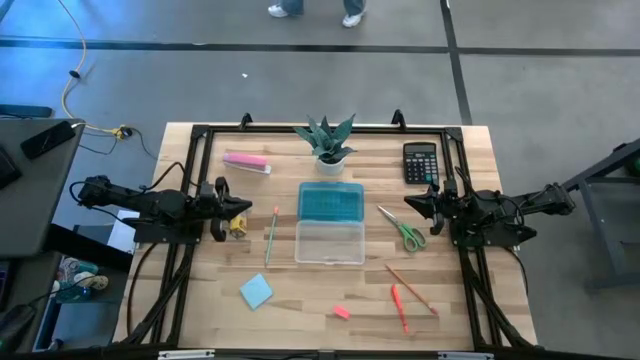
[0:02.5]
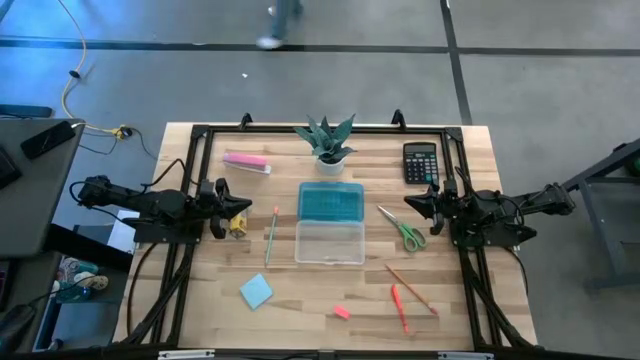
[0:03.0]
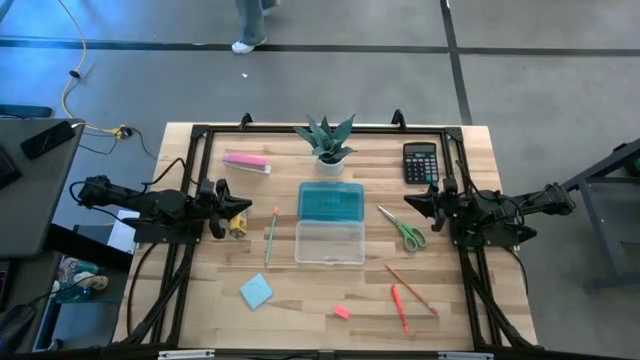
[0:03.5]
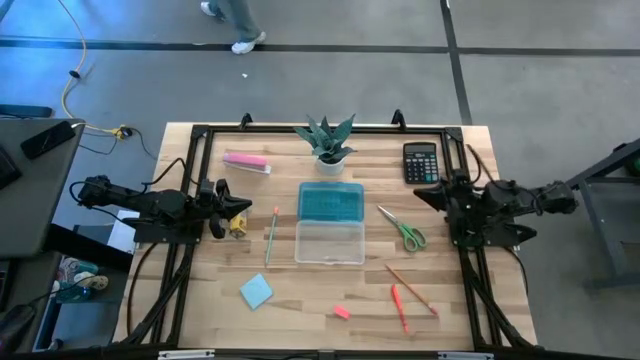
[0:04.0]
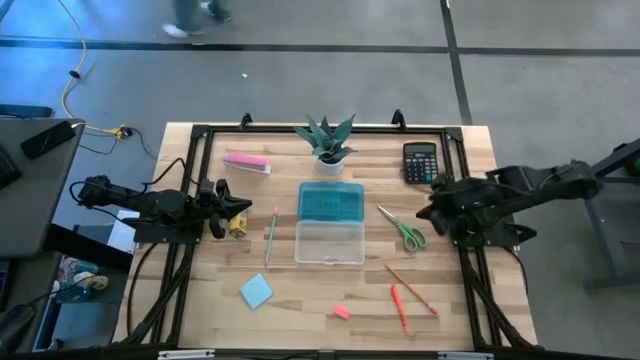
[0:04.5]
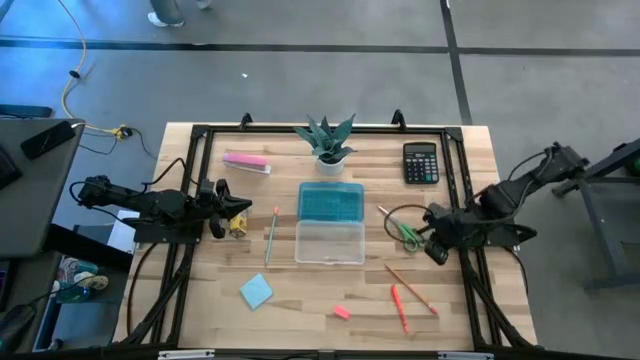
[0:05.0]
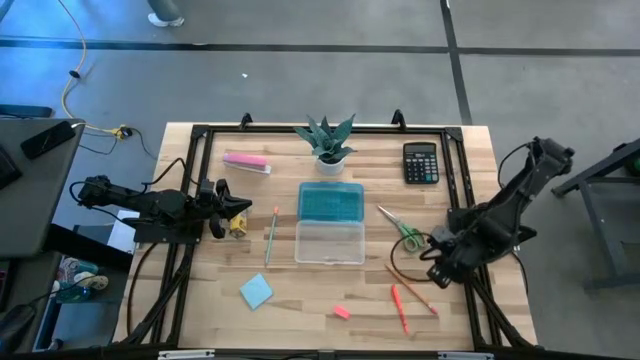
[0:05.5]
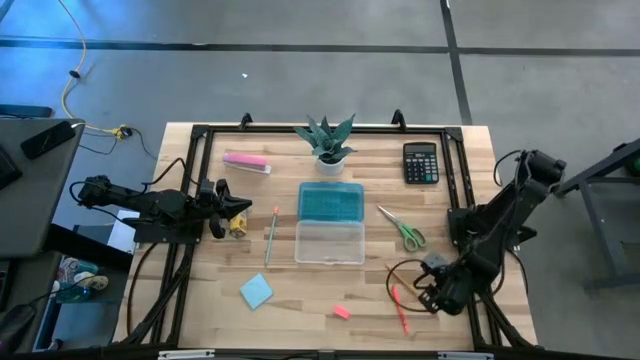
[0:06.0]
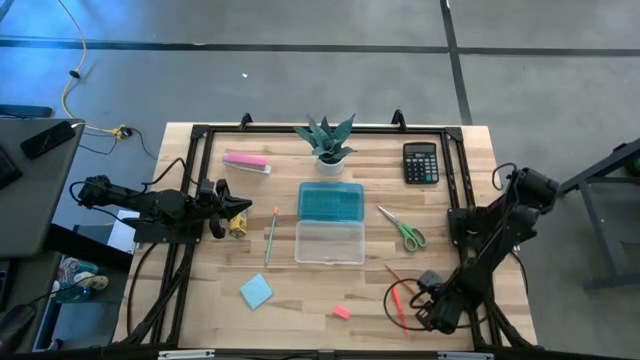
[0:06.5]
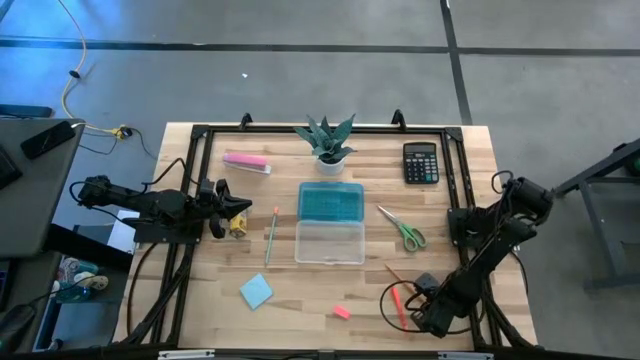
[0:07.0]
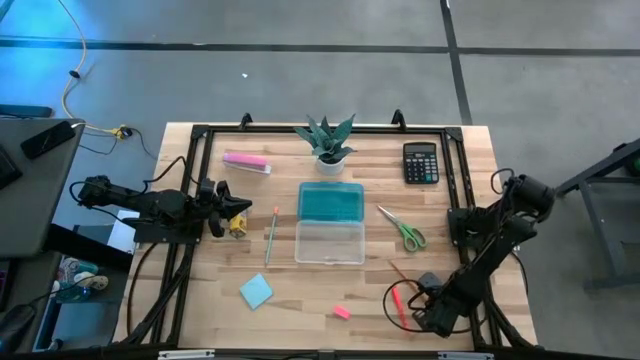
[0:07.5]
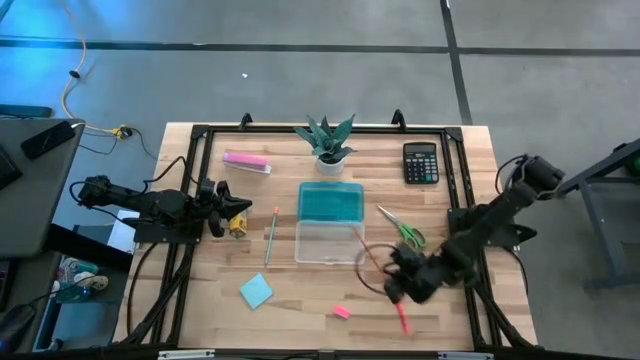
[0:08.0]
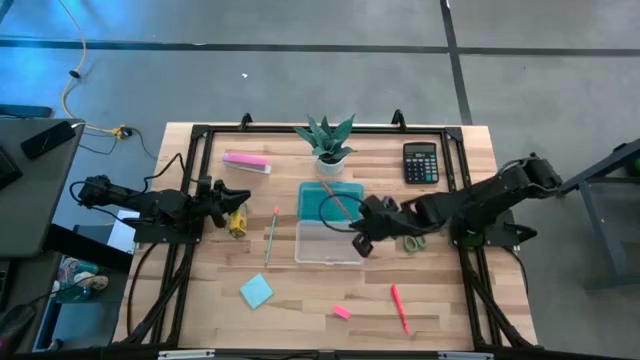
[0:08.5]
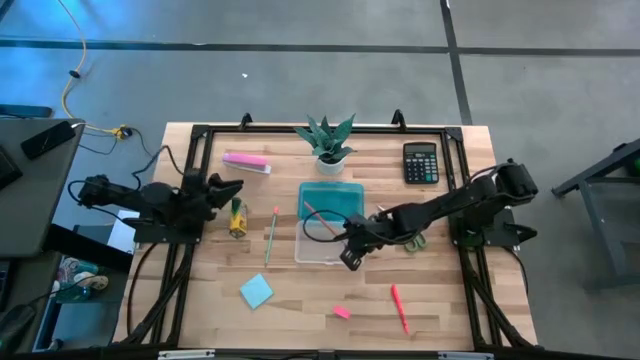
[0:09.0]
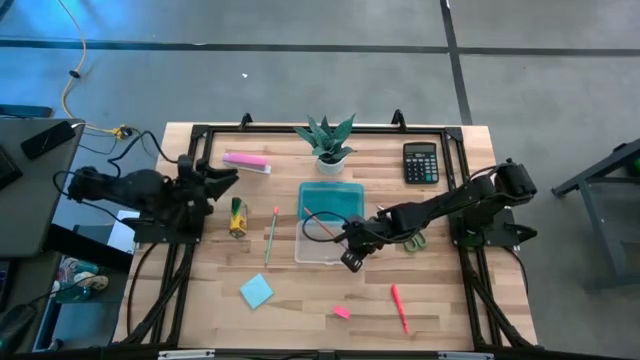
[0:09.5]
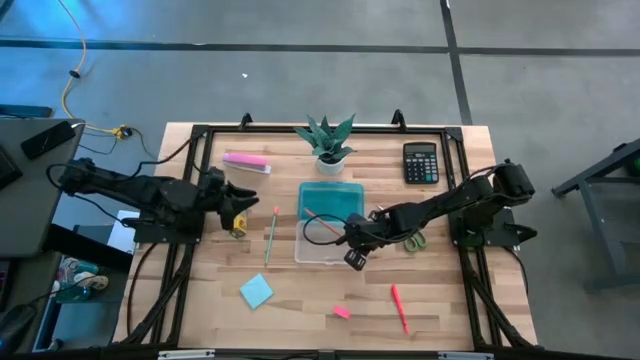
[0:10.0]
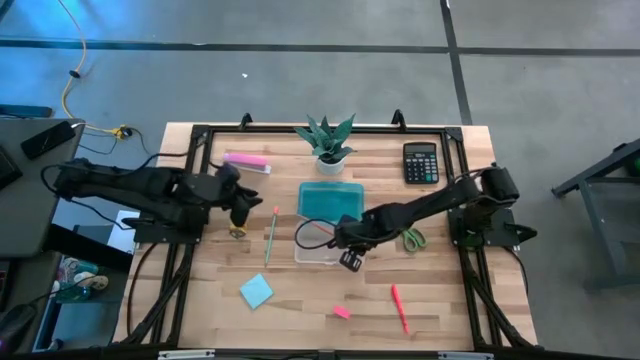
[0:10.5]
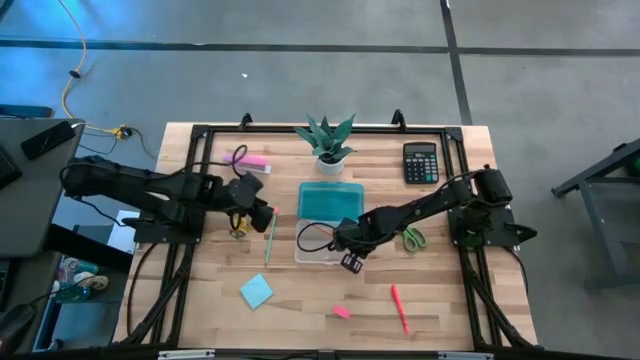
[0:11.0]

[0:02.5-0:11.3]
Task: Pack school essentials
Put the yellow pencil into the supply box

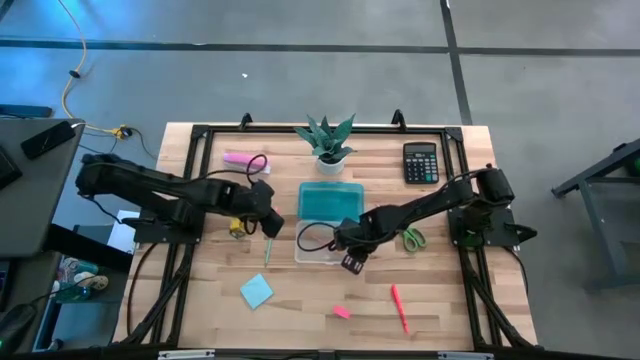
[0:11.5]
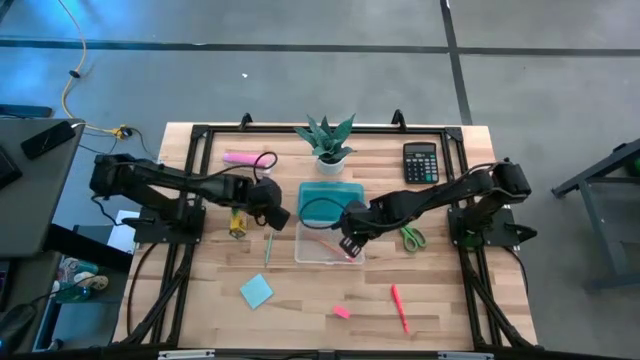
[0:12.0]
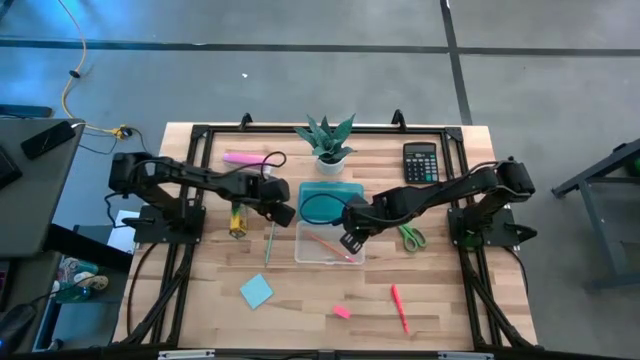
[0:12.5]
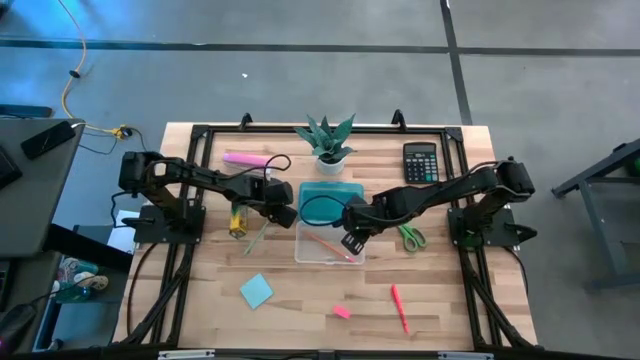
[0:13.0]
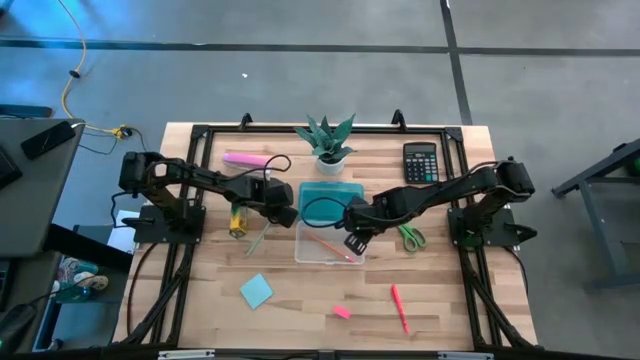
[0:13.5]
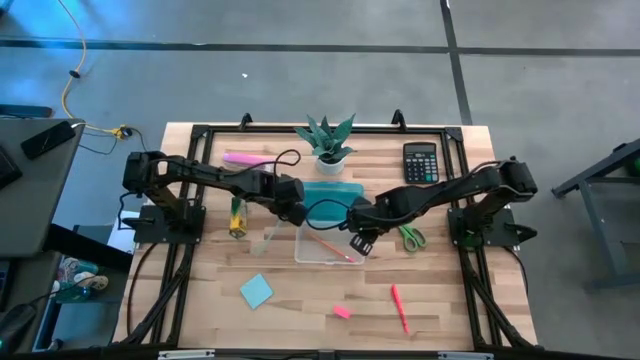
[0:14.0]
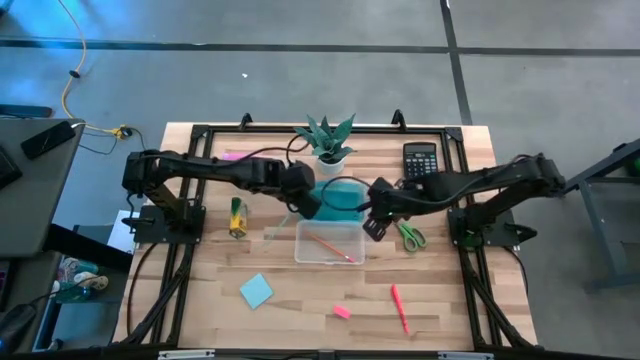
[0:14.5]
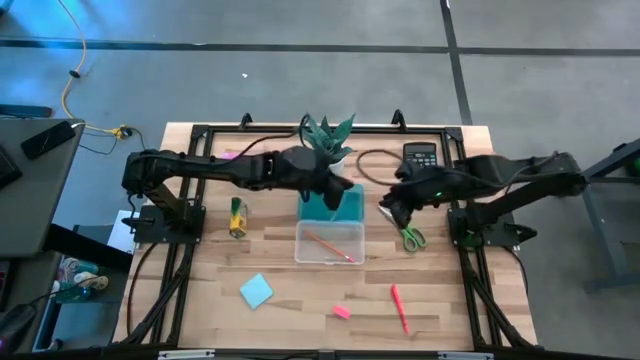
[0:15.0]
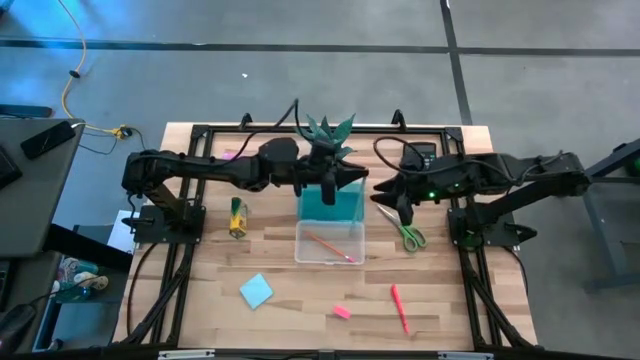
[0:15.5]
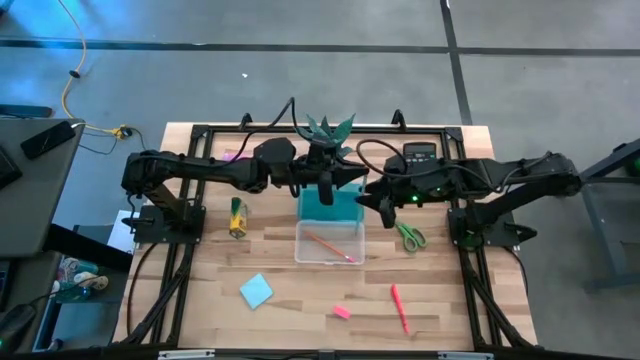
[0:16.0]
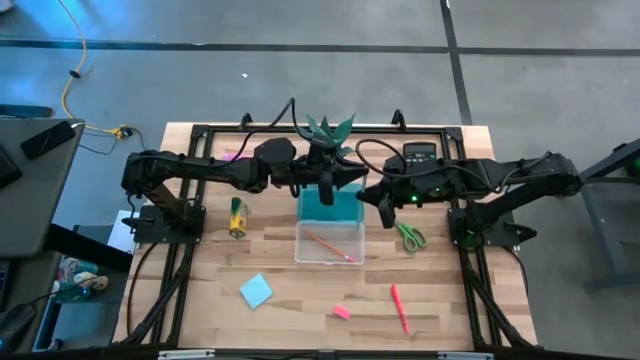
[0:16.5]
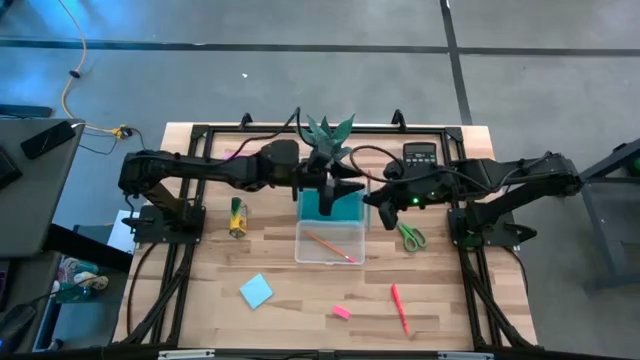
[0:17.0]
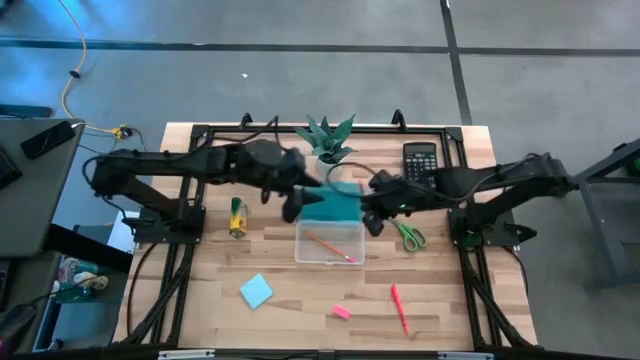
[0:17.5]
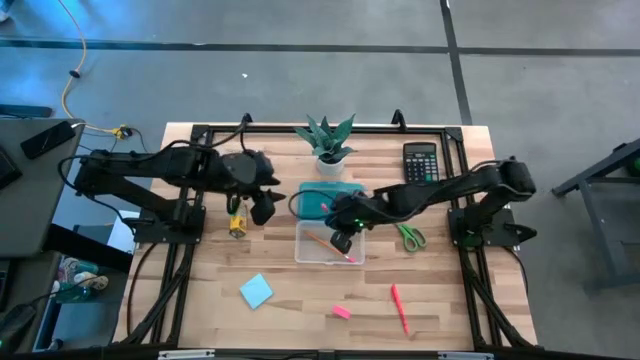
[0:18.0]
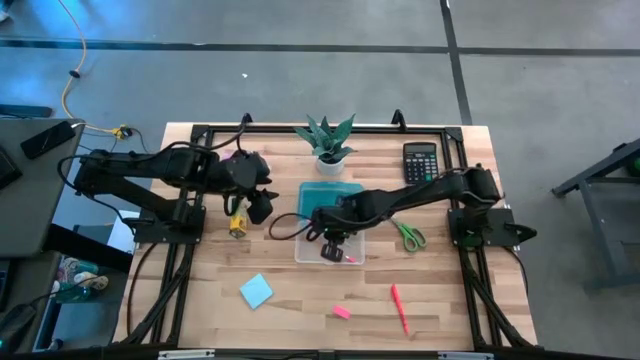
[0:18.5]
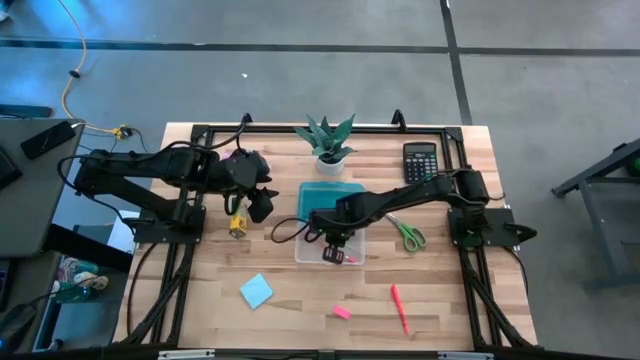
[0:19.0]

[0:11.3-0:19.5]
Put the blue pencil into the supply box

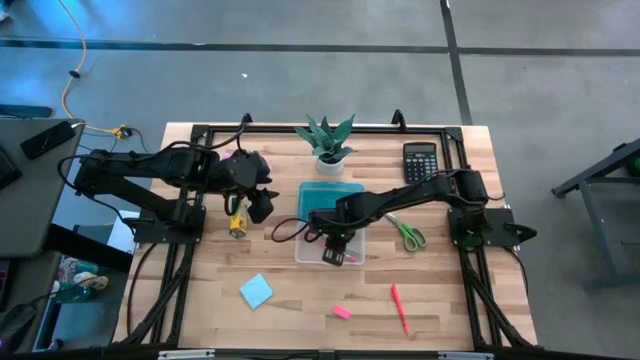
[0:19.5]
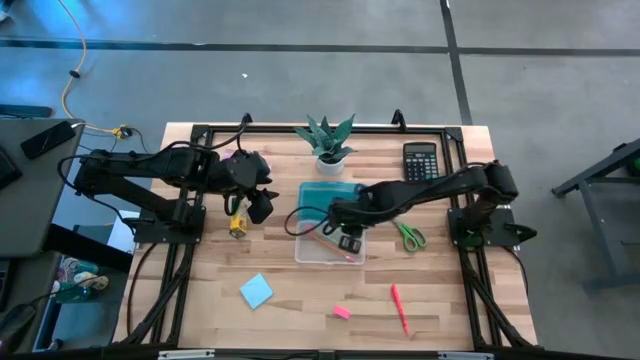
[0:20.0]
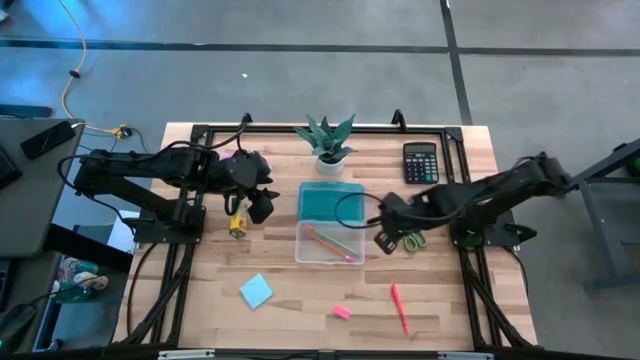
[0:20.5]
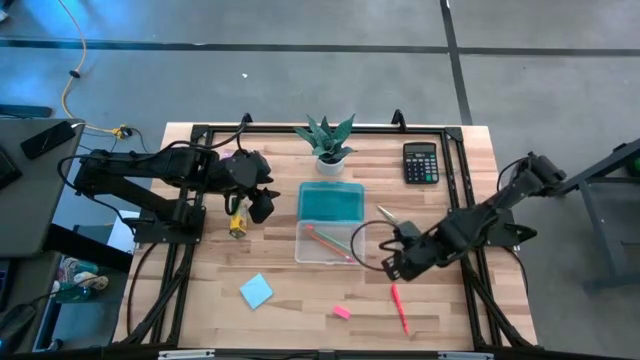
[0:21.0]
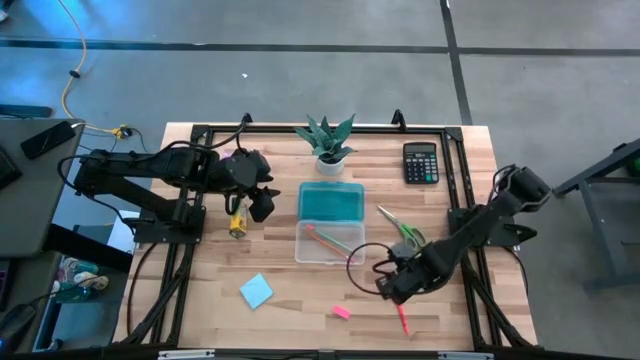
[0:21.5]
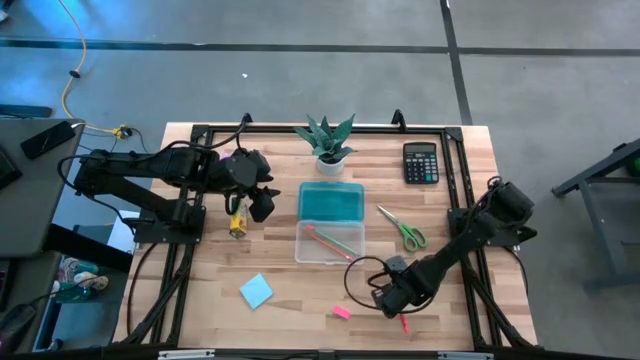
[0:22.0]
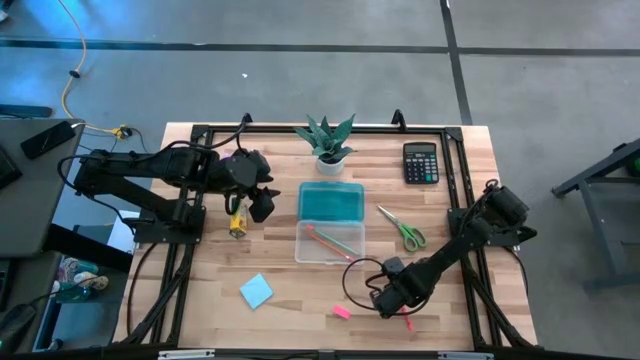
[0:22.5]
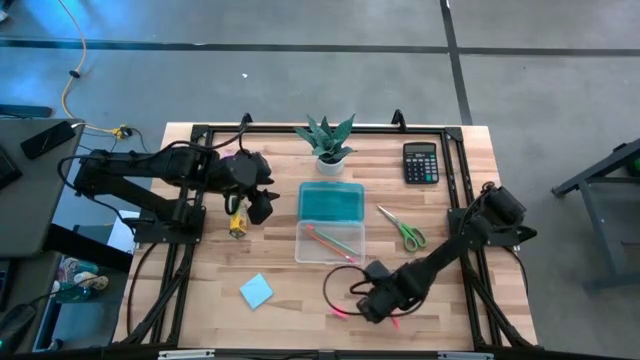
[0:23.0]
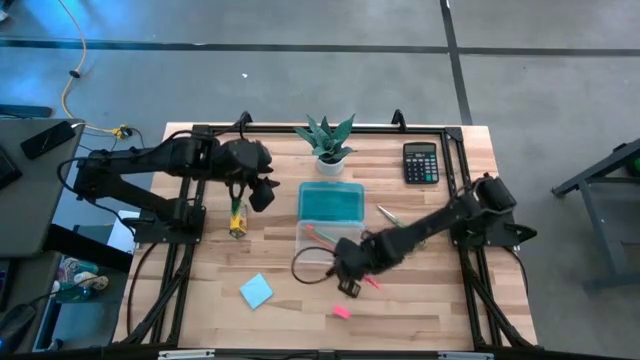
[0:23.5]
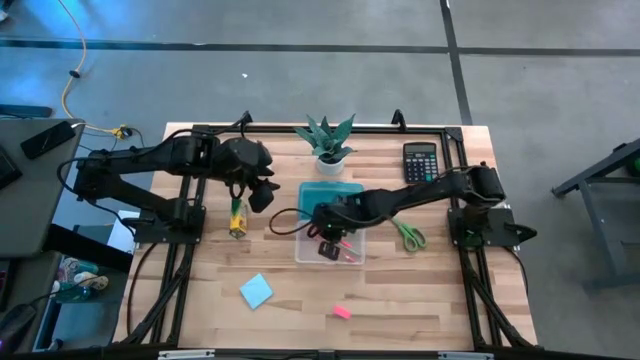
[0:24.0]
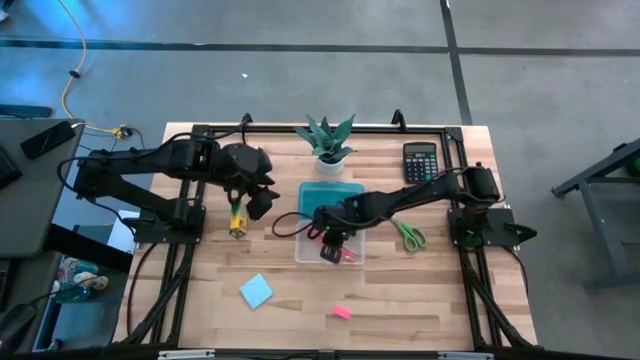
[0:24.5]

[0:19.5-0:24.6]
Put the orange pen into the supply box
